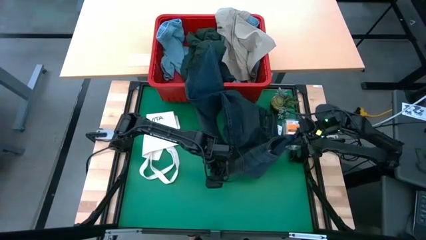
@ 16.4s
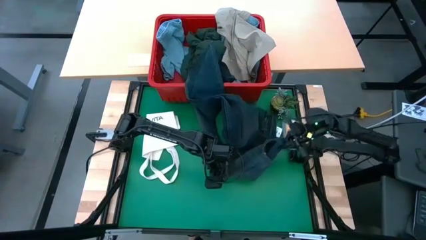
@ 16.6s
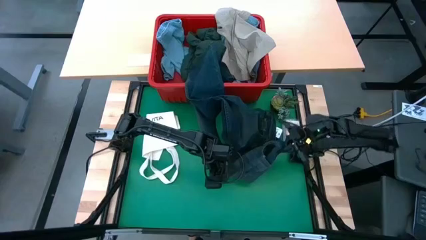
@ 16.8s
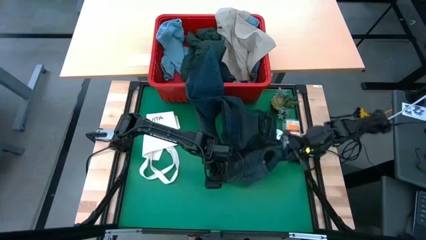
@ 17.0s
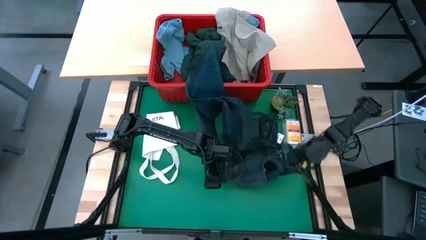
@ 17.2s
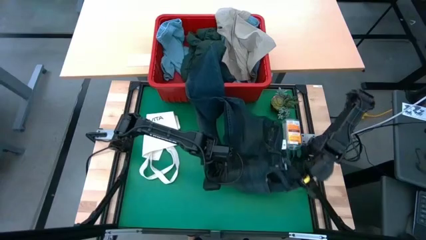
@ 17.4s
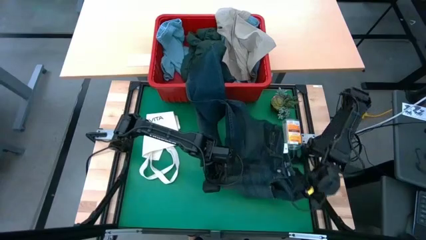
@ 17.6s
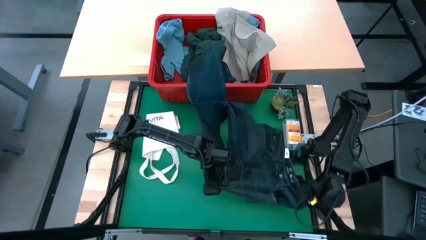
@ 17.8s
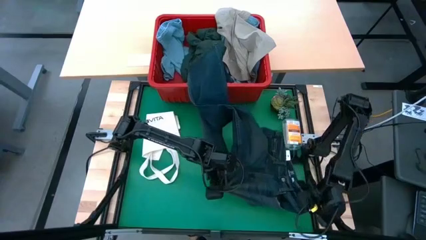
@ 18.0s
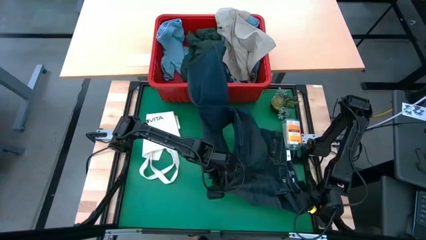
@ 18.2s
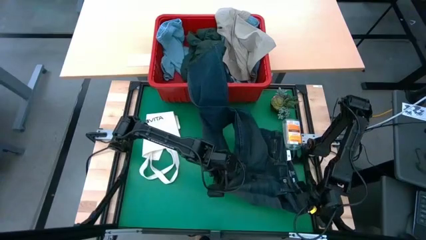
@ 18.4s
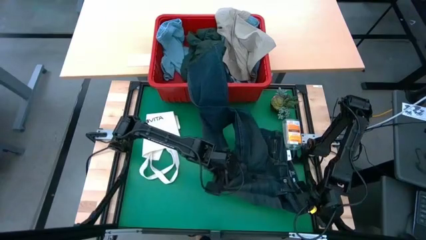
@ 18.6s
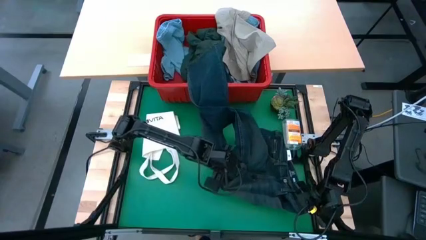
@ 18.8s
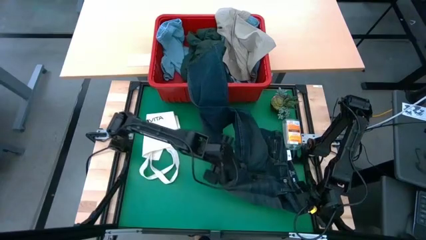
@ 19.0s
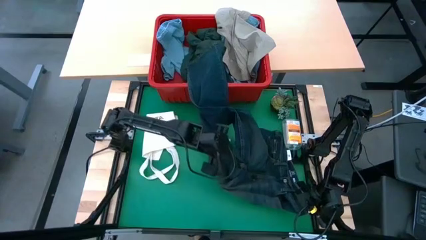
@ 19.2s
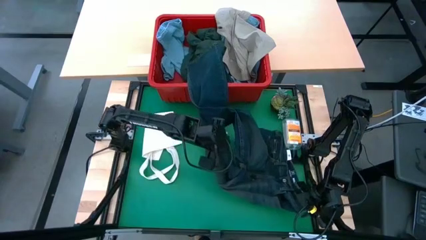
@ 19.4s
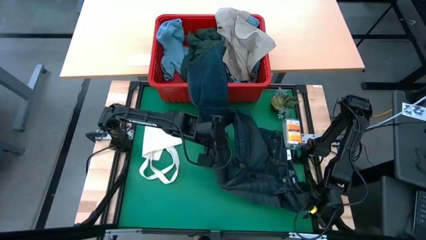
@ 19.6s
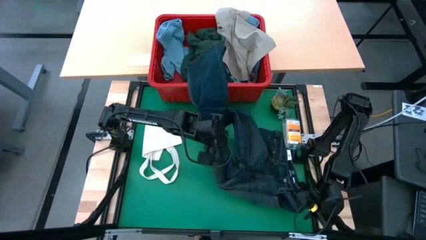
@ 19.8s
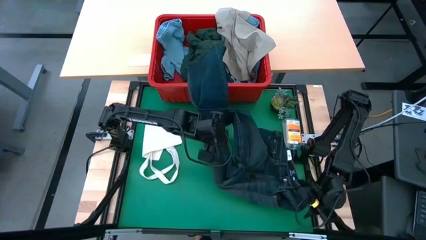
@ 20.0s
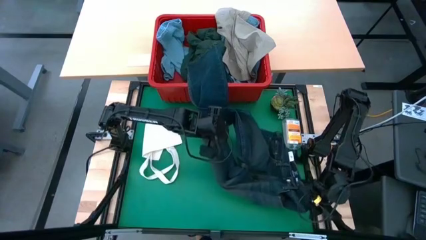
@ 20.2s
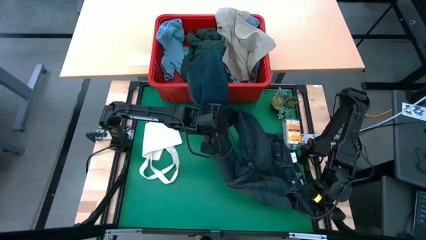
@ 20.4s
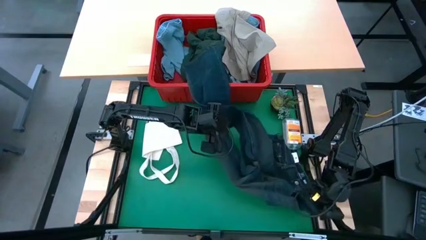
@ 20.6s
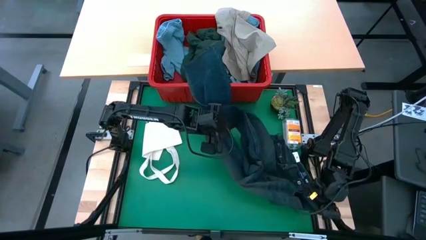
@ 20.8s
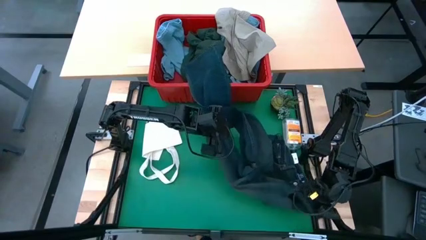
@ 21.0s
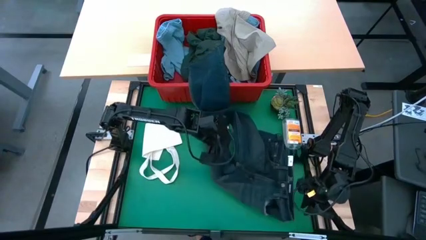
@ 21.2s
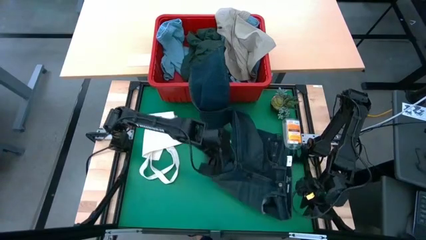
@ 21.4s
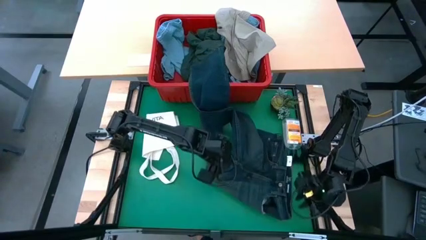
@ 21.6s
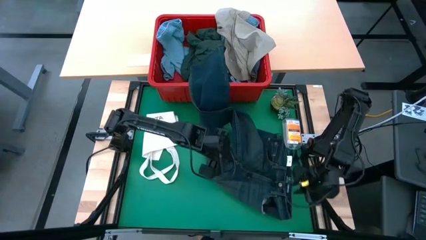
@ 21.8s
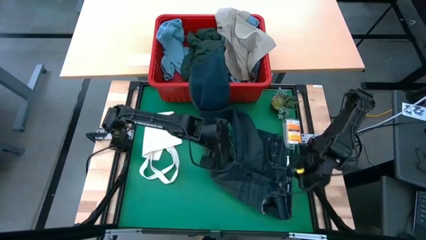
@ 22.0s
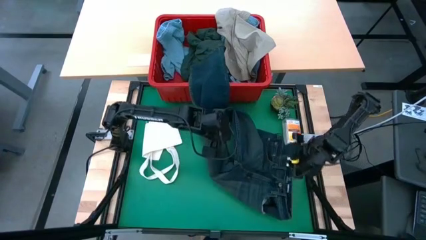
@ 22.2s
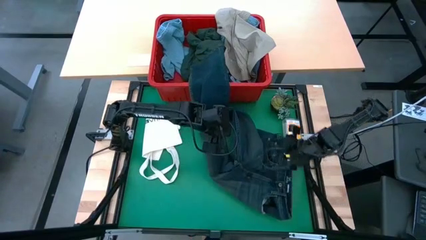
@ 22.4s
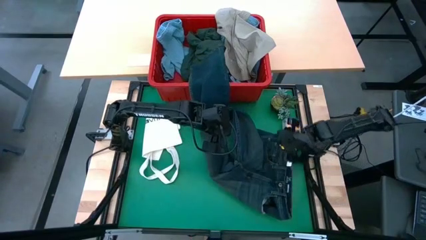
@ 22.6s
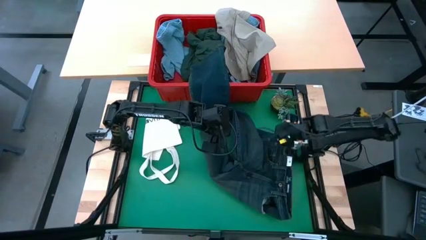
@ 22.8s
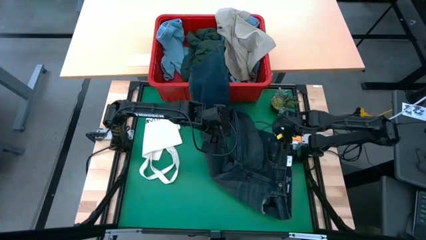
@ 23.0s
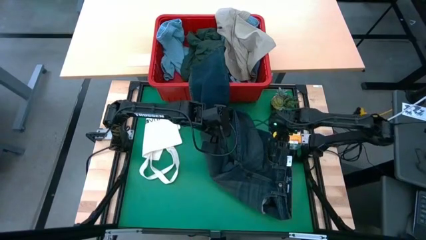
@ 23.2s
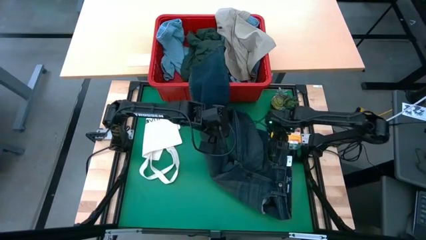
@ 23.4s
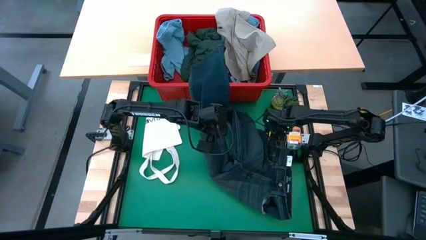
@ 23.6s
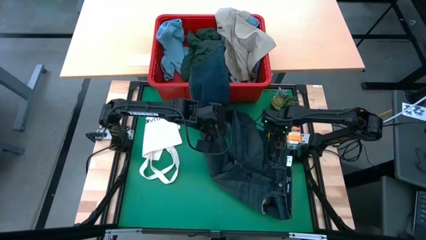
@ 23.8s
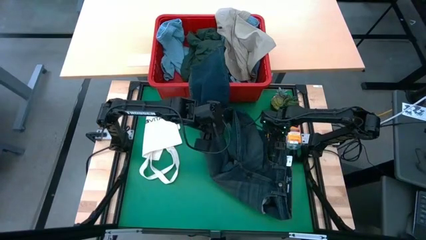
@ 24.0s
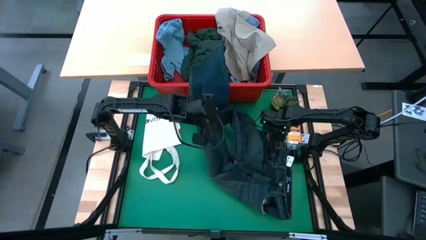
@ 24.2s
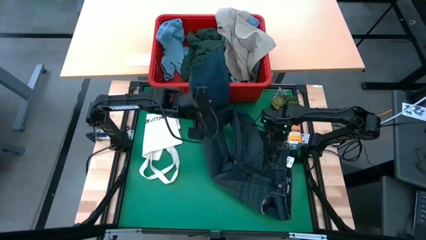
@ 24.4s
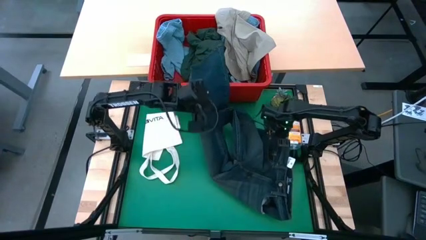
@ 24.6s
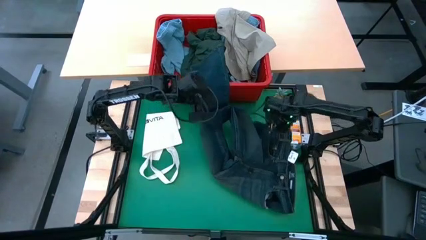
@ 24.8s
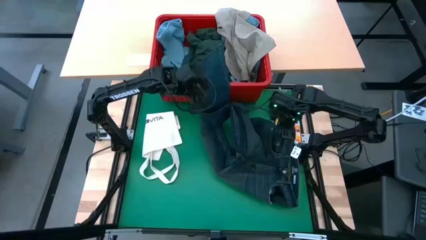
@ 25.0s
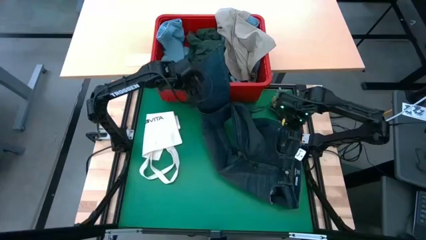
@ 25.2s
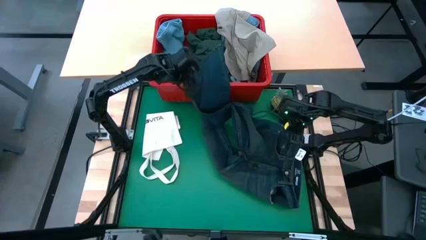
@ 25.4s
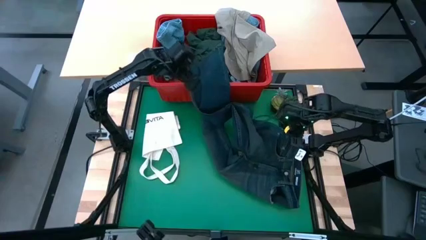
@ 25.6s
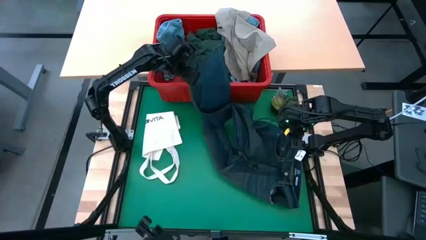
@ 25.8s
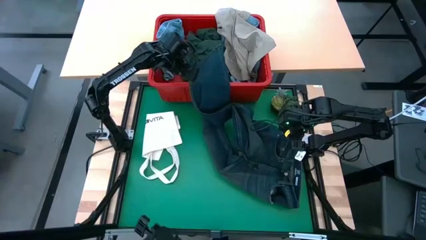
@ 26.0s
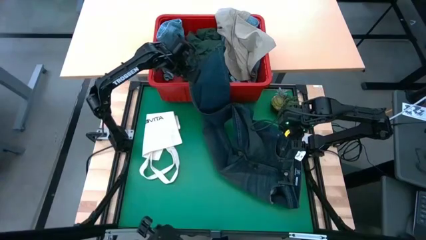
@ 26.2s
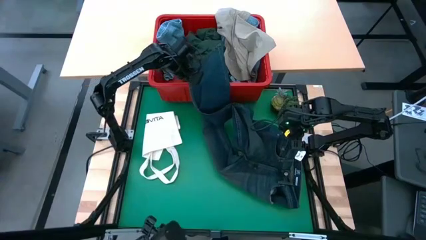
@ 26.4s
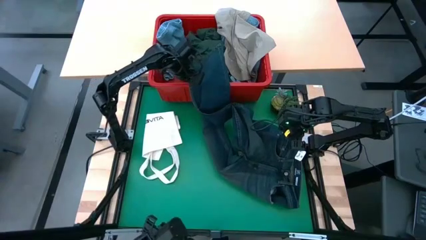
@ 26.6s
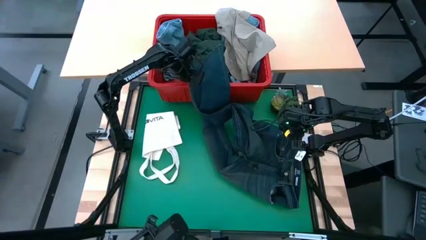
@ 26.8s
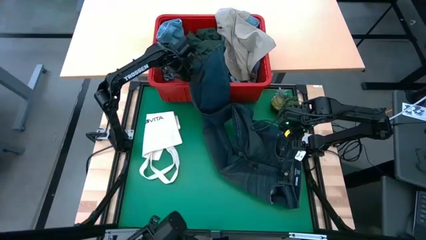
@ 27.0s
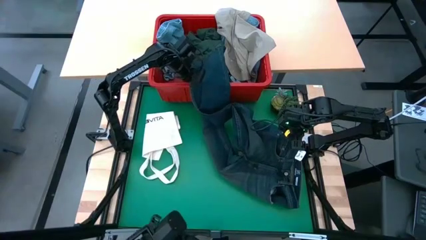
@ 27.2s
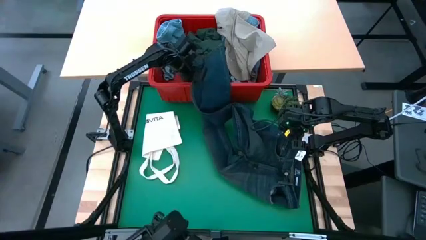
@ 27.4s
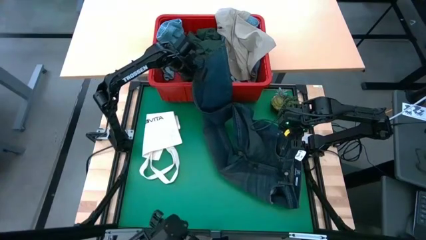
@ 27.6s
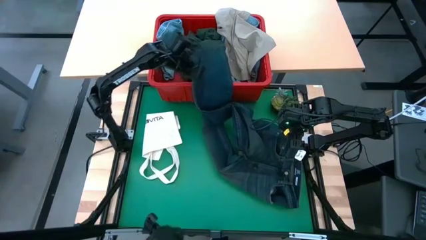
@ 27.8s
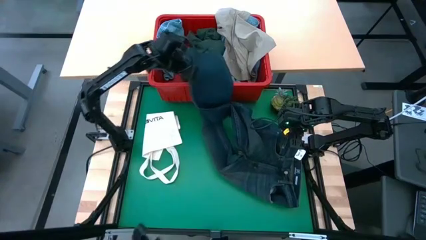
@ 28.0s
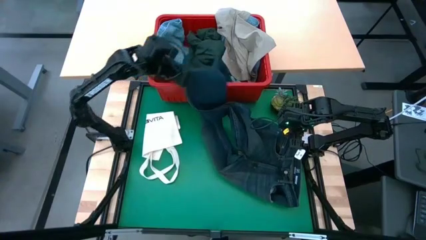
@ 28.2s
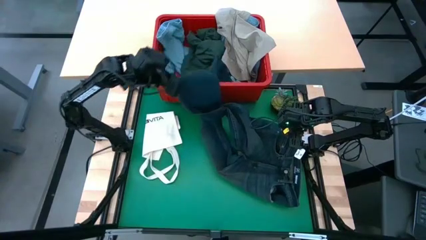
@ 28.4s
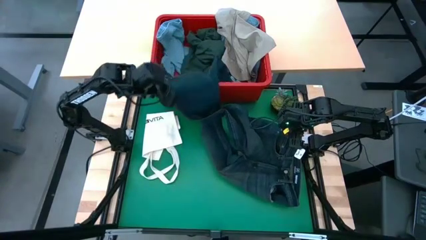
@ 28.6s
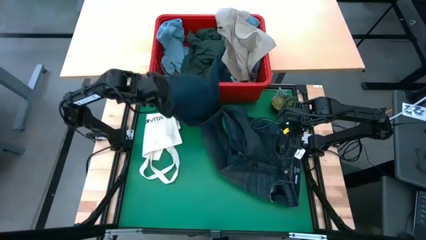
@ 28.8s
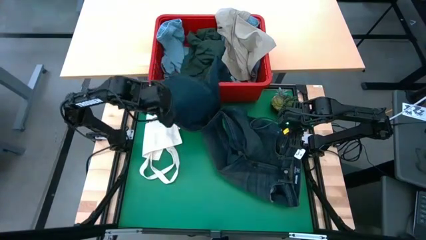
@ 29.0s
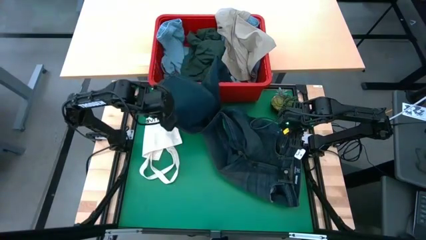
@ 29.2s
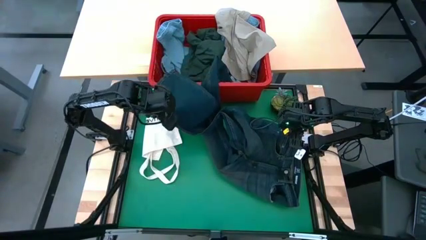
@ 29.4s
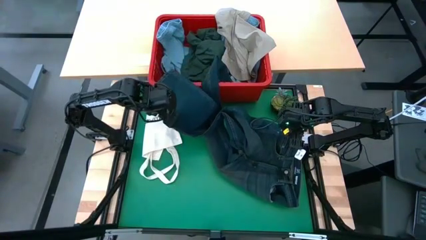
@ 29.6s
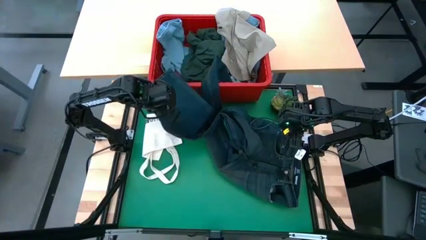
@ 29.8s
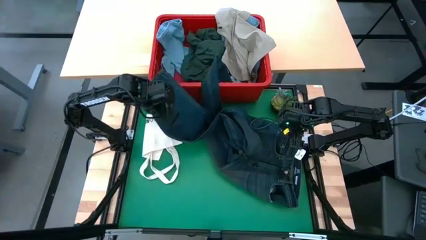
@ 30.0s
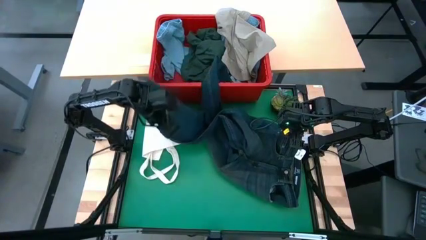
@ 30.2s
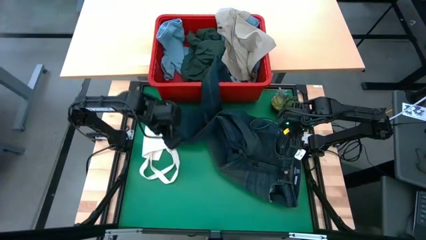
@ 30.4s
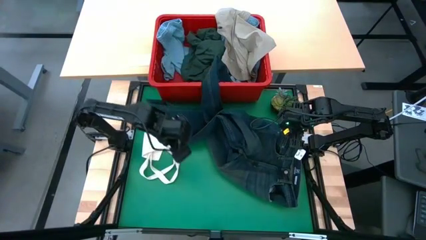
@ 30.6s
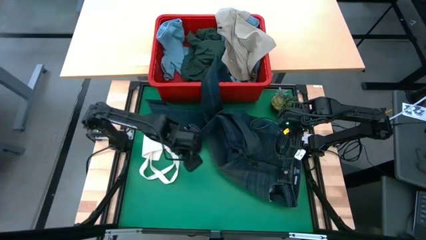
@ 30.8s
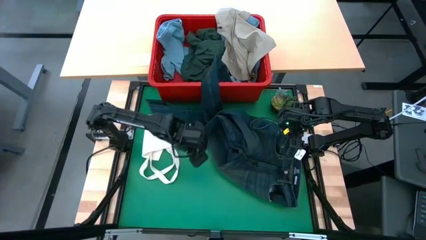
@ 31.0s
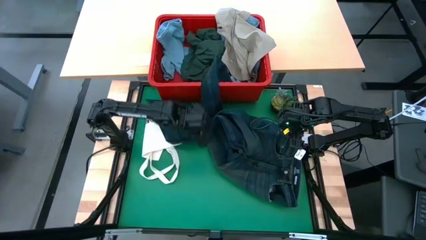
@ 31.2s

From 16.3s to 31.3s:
Task: Fold laundry
Remove the dark blue pants from the laundry bin

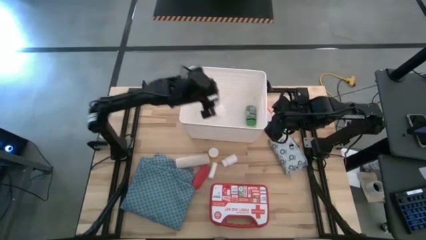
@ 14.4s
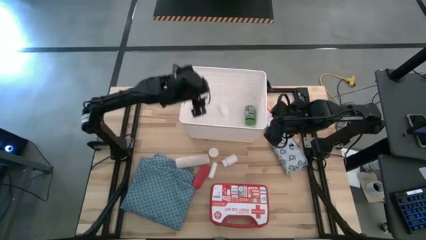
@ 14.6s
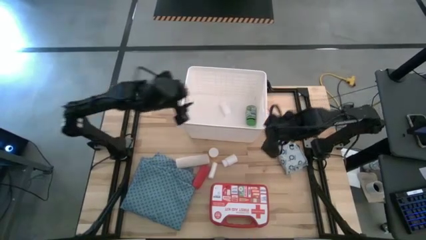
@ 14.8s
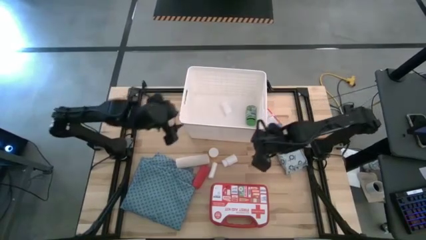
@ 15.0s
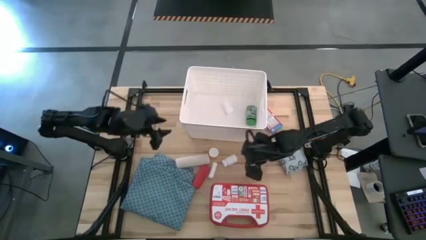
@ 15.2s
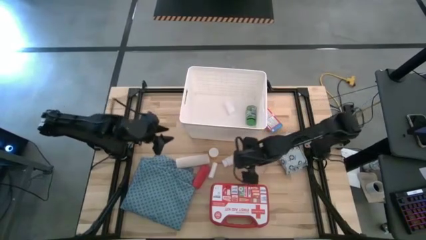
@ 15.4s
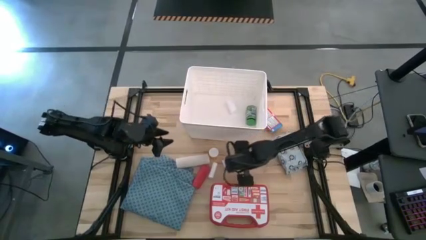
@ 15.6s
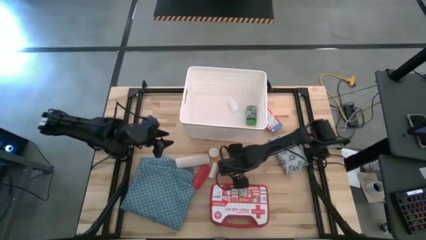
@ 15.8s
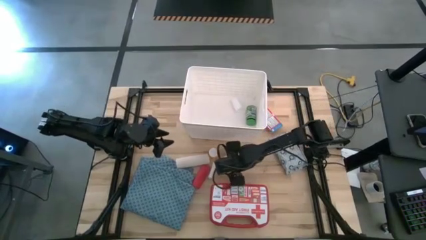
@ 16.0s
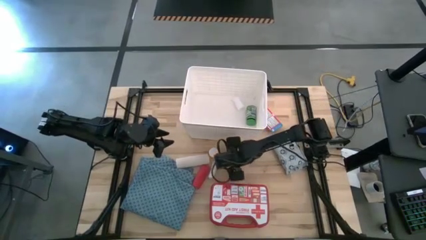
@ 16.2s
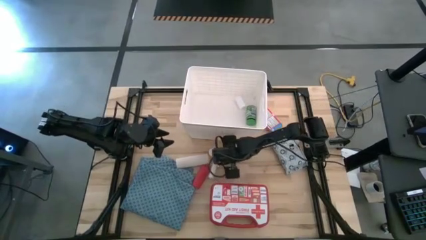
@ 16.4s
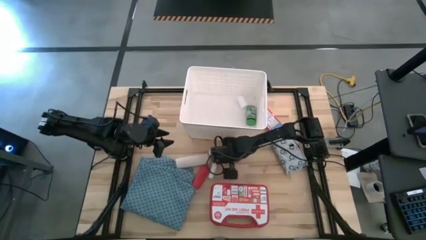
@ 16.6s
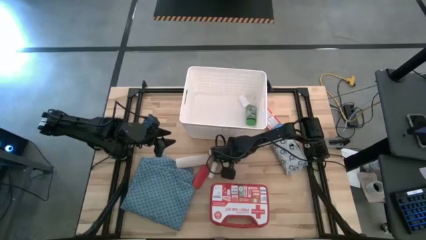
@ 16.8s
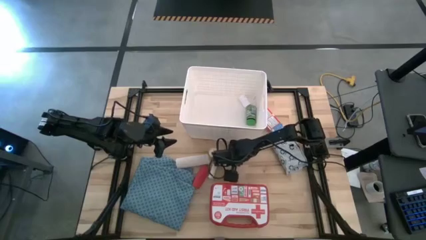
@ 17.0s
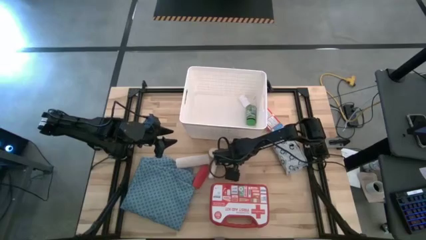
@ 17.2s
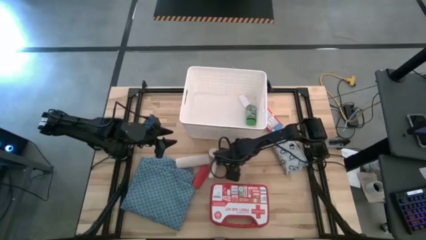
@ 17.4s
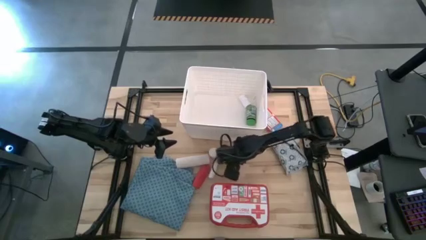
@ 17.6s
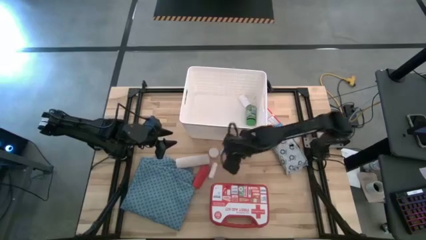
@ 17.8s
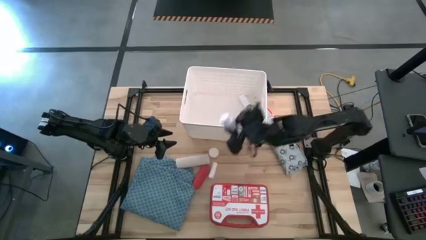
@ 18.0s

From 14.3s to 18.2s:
Task: Pick & place medical supplies in basket/bin
Put the white pill bottle into the white bin
